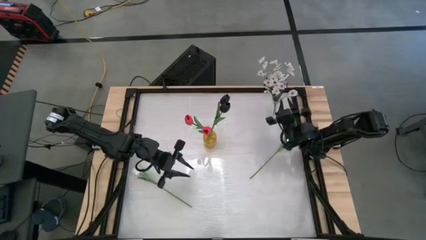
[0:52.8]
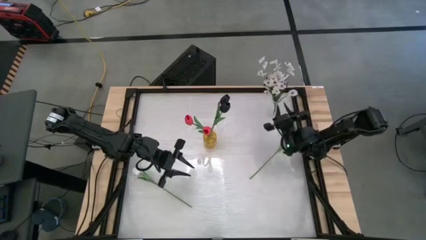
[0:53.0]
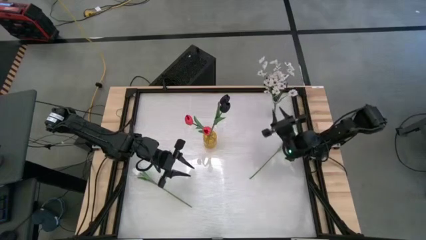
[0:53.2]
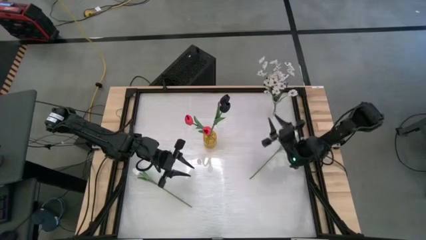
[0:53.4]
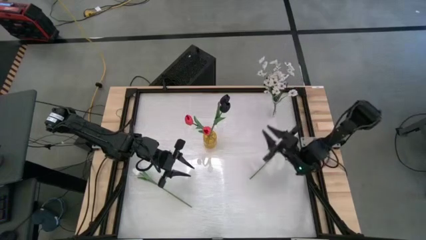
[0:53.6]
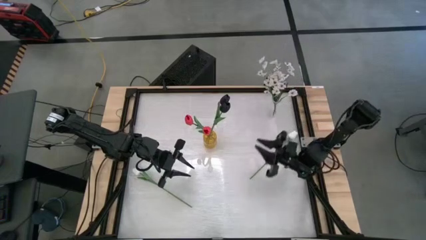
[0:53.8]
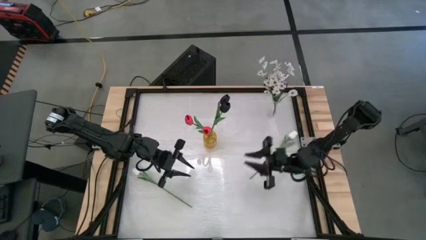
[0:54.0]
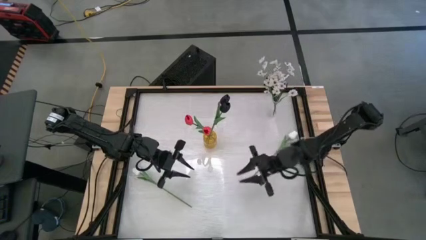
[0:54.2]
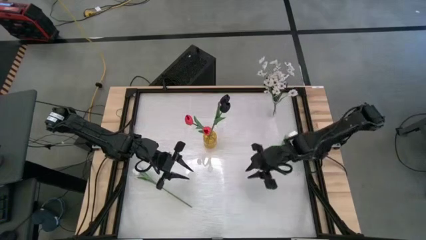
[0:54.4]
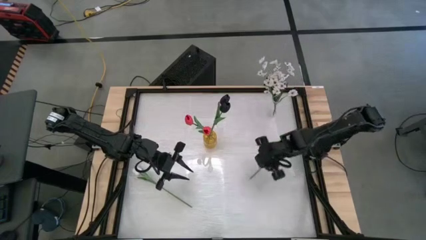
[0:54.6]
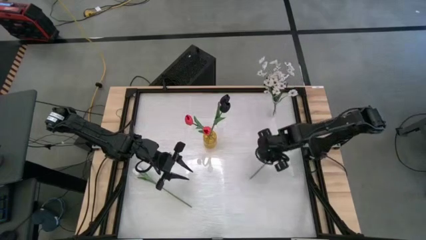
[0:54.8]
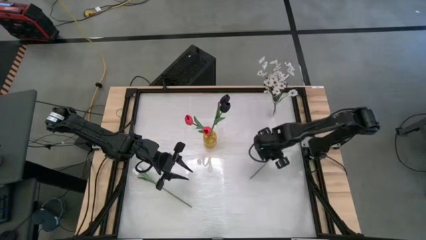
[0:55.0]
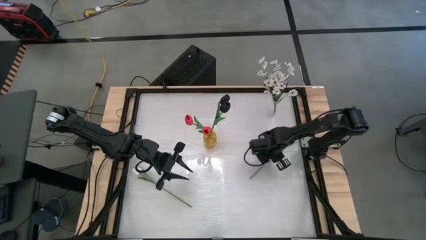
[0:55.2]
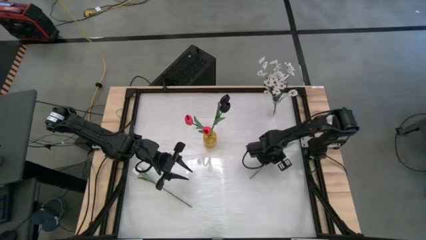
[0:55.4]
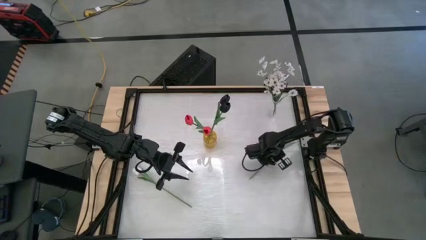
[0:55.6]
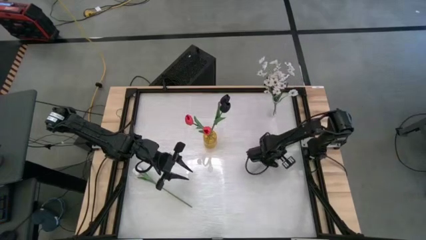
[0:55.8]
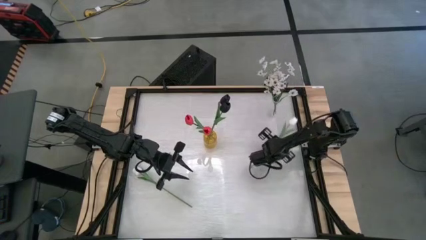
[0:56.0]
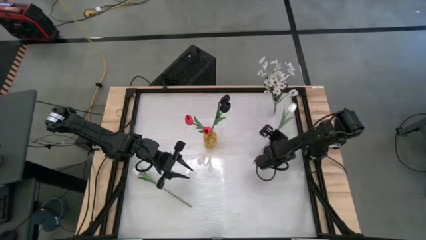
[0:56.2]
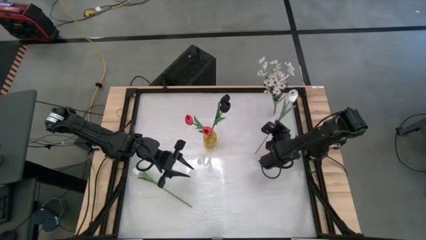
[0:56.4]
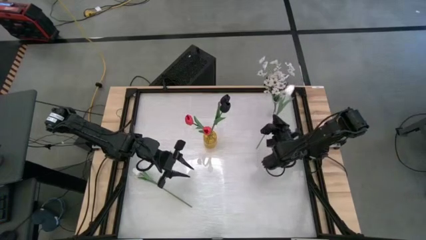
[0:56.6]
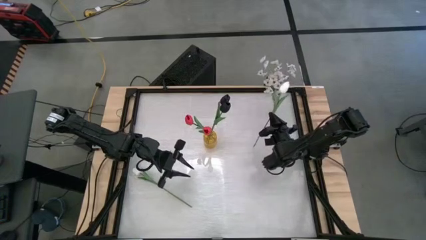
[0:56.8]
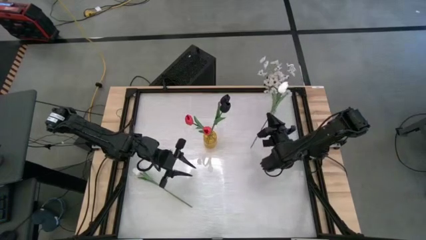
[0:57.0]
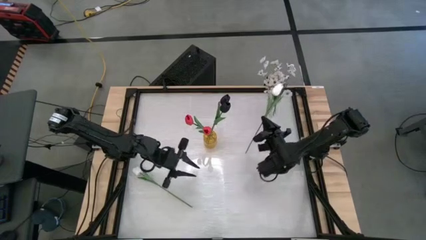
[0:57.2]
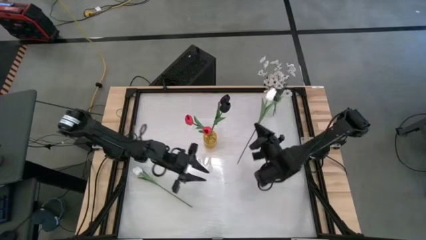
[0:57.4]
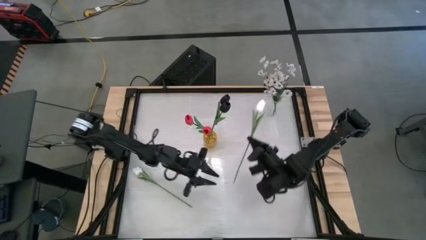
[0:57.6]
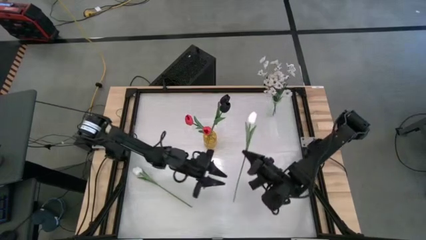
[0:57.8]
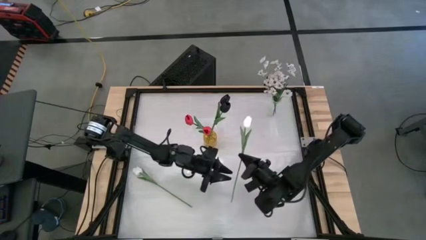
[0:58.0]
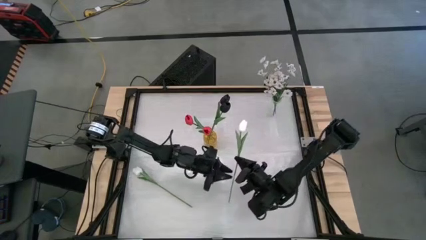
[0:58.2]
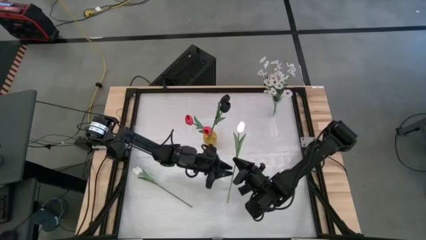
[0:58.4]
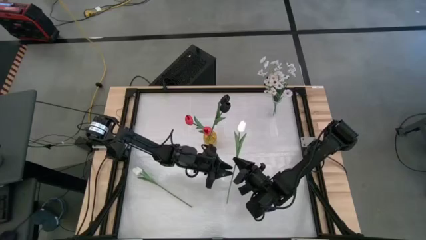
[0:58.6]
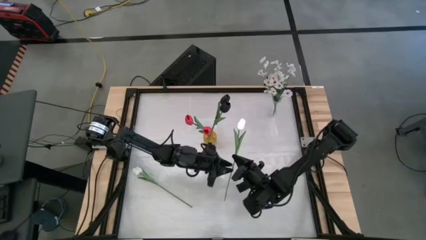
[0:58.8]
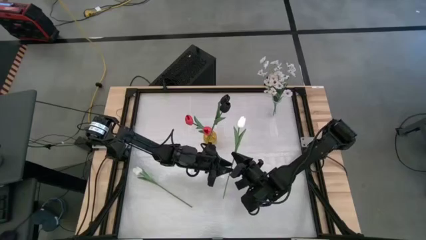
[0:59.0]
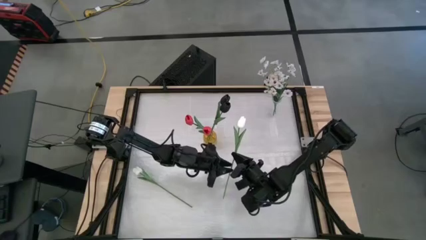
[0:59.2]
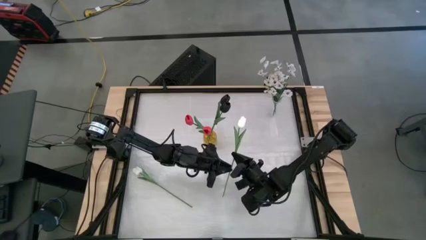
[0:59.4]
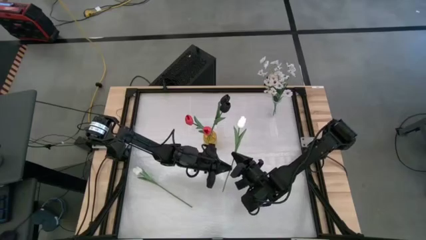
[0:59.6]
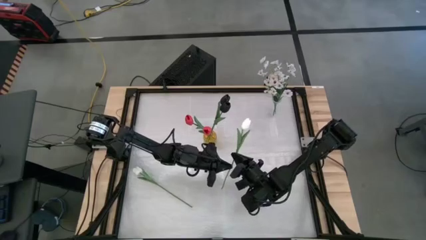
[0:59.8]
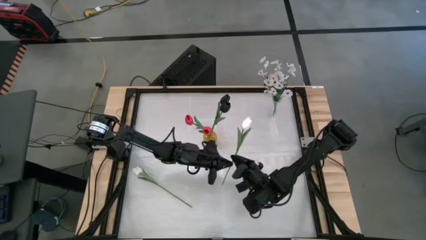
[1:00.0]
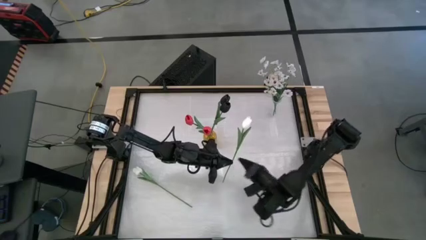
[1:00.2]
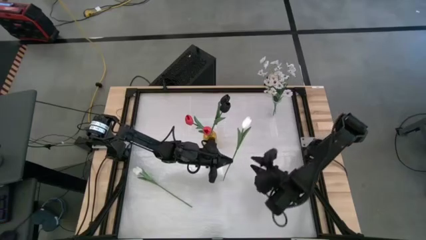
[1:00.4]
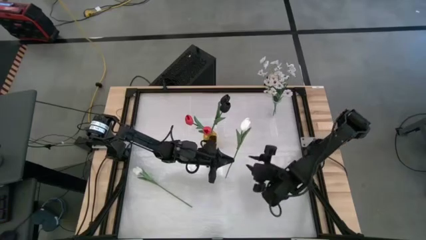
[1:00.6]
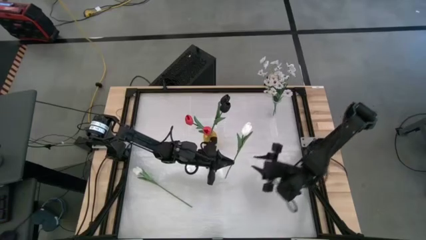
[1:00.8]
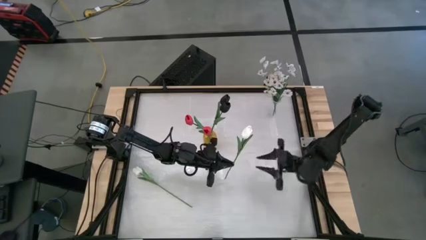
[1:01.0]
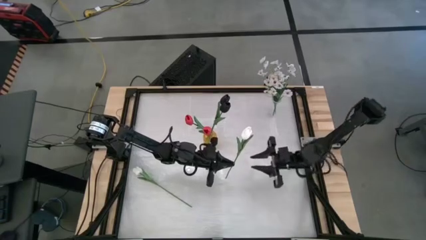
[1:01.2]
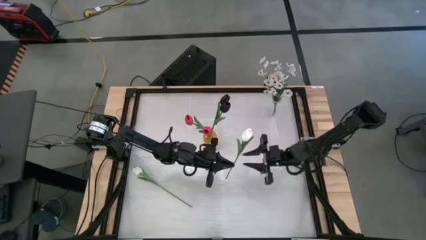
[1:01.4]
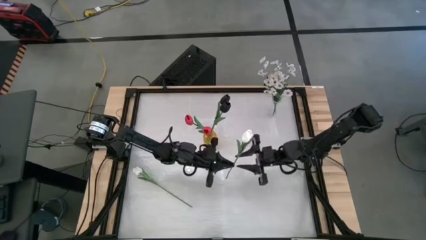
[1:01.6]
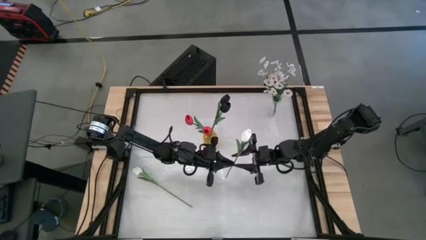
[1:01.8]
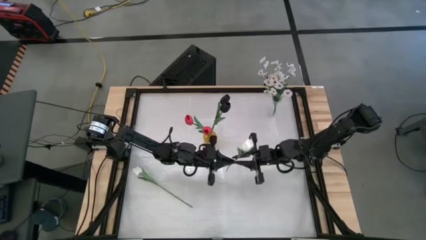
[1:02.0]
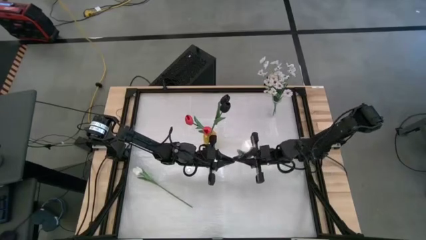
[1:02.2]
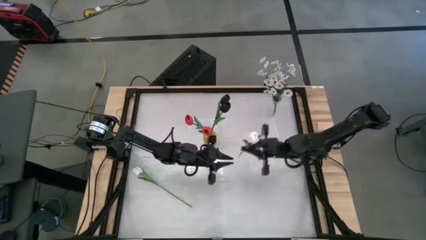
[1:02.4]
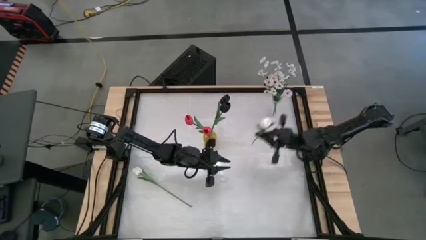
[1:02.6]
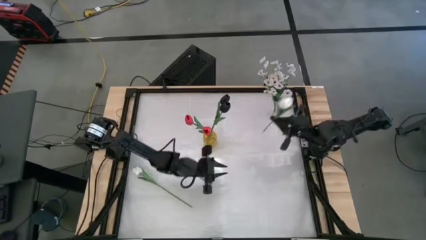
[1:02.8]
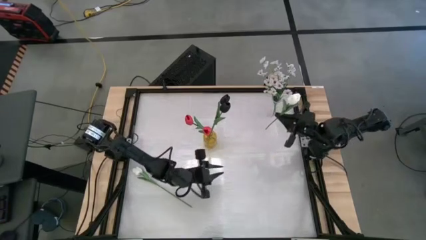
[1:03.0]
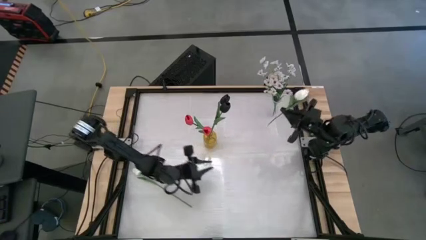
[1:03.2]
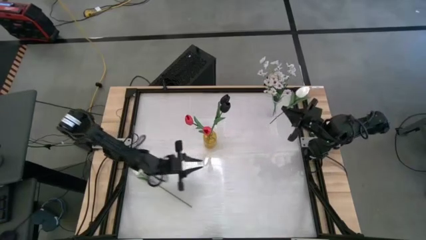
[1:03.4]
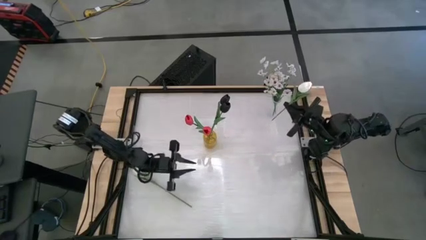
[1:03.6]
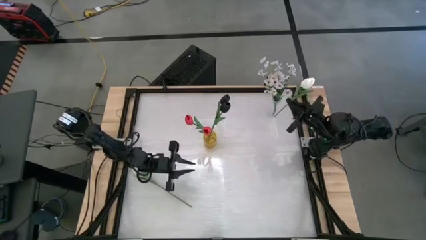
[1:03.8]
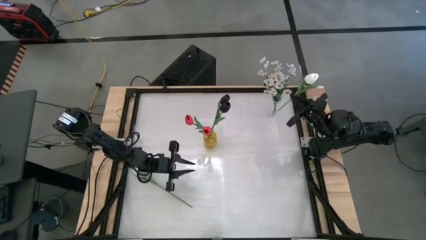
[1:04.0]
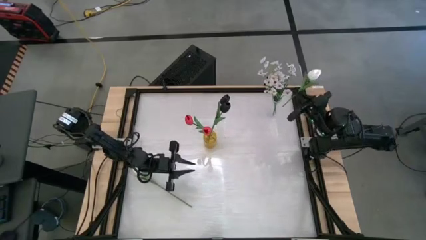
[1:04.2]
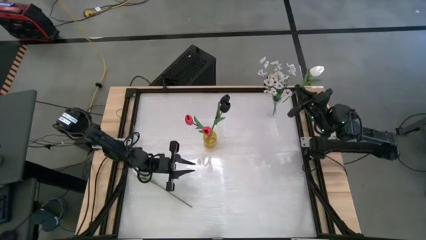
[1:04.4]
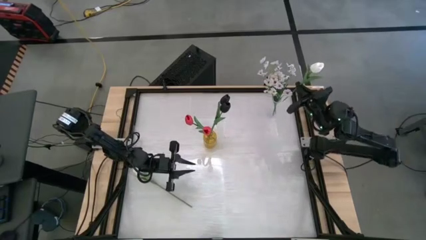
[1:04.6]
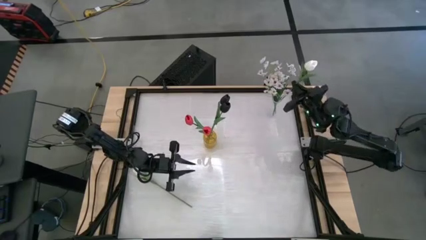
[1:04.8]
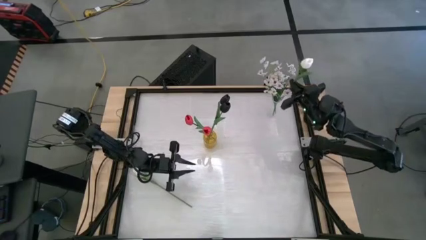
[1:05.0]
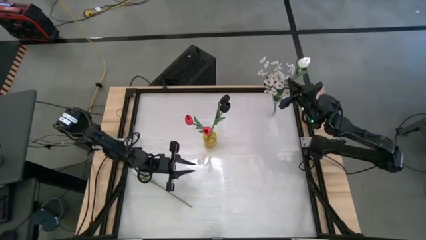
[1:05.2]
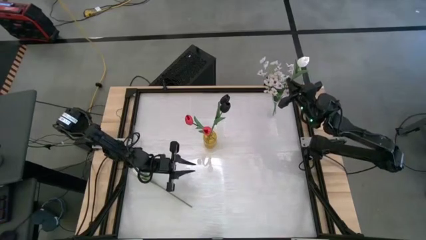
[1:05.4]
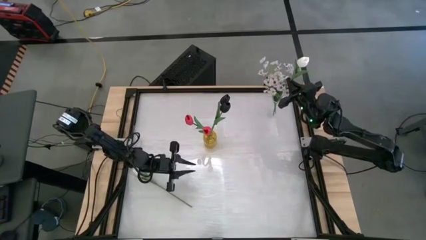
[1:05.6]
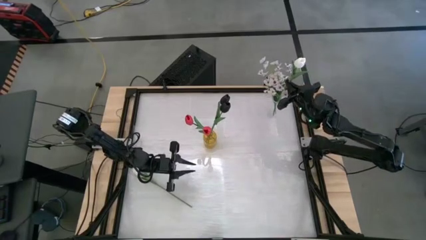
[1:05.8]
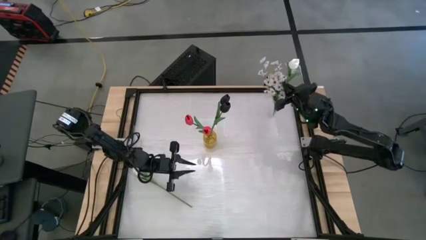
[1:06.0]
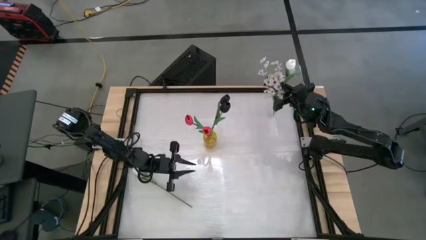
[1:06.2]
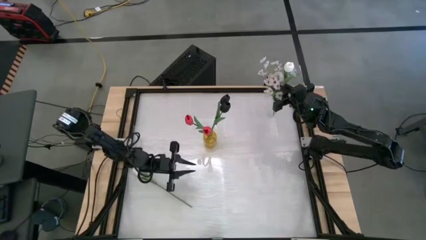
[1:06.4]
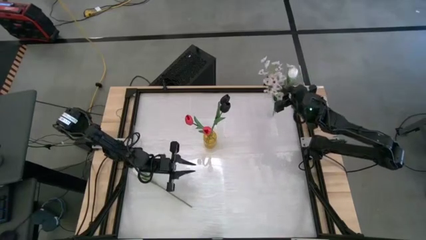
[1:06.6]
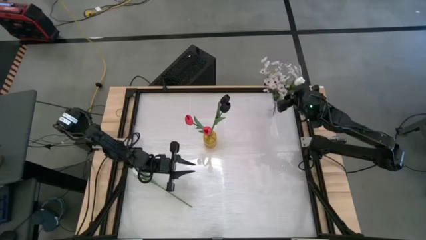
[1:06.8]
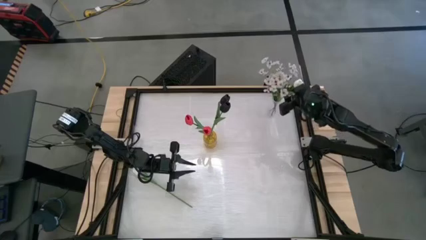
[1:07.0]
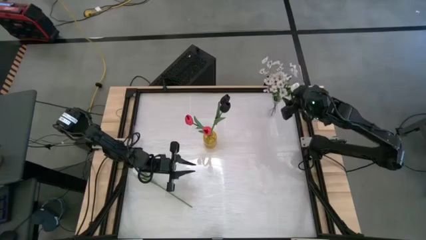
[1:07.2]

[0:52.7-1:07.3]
Task: Sort flowers into vase by color
Put the right white tulip into the transparent flower vase

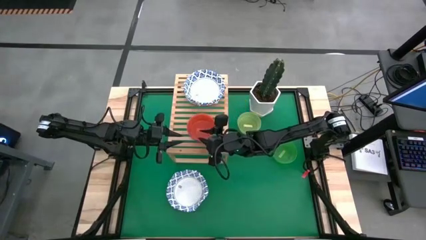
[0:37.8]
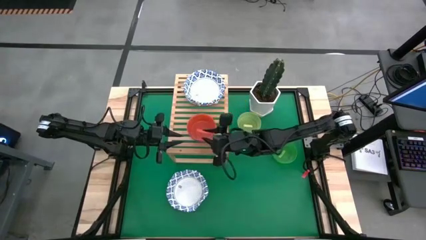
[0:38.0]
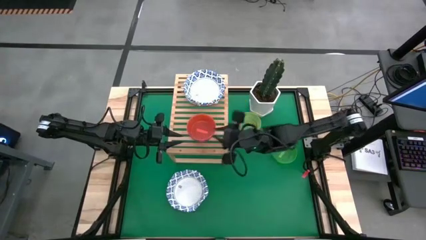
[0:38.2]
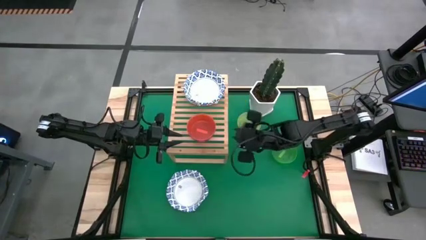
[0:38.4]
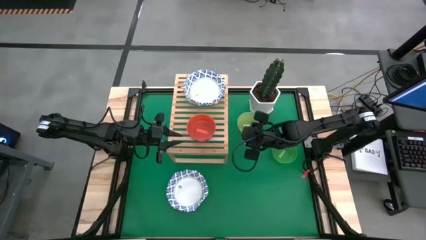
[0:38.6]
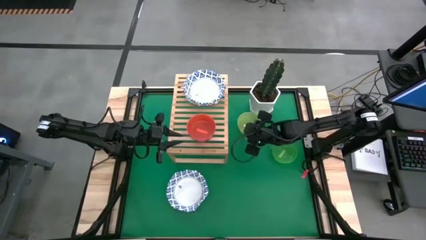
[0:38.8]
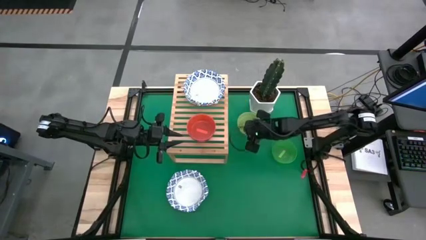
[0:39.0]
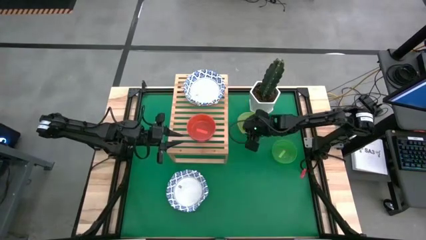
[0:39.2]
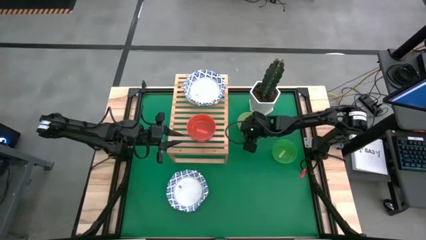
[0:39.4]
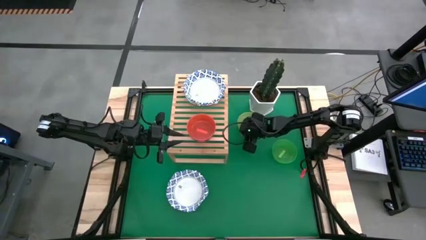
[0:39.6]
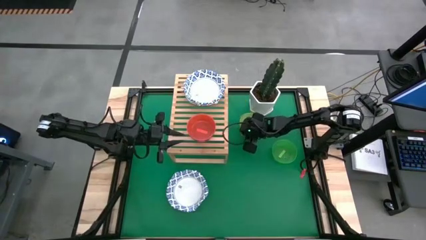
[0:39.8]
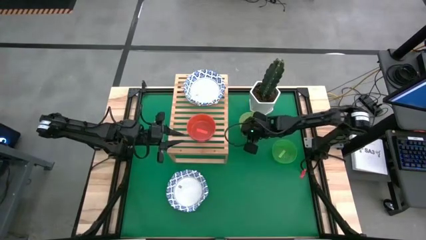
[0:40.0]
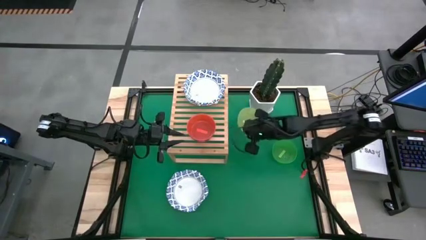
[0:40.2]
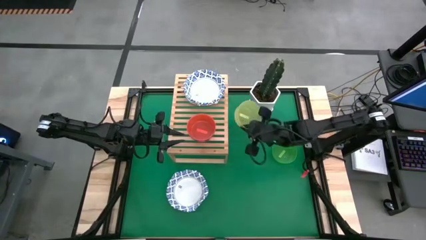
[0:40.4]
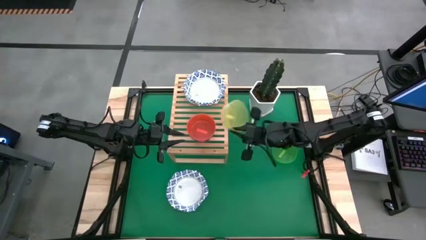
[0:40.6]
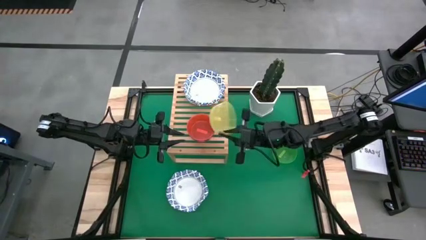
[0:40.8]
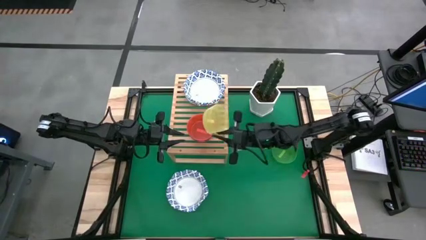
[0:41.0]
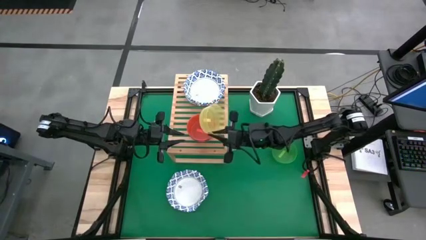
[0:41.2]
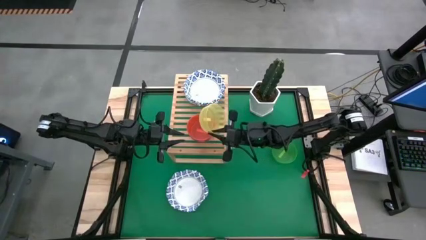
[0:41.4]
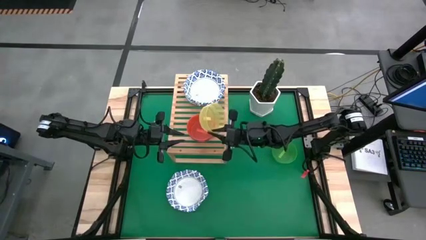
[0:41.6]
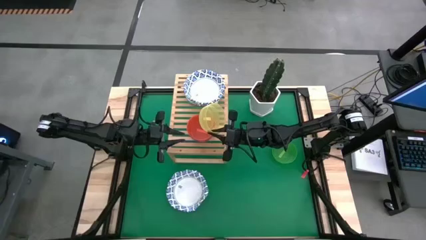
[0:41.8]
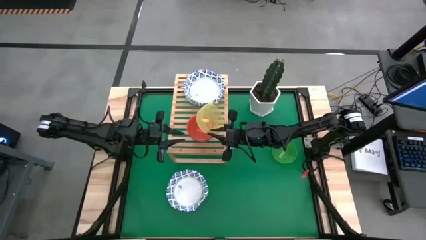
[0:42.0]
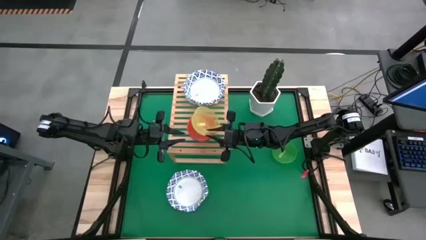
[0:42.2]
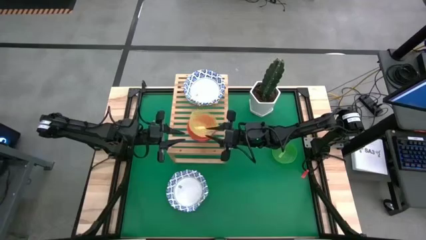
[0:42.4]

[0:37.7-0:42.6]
Task: Place and stack bowls onto a shelf
Stack the yellow bowl on top of the orange bowl on the shelf
